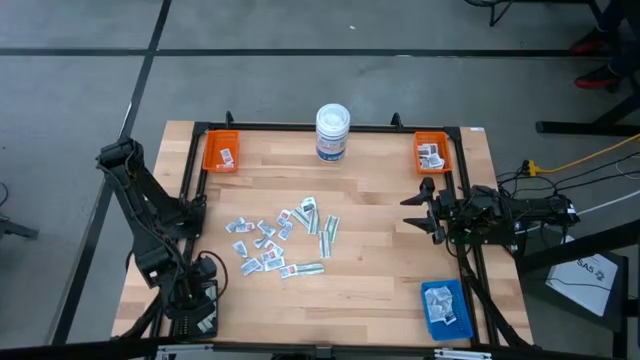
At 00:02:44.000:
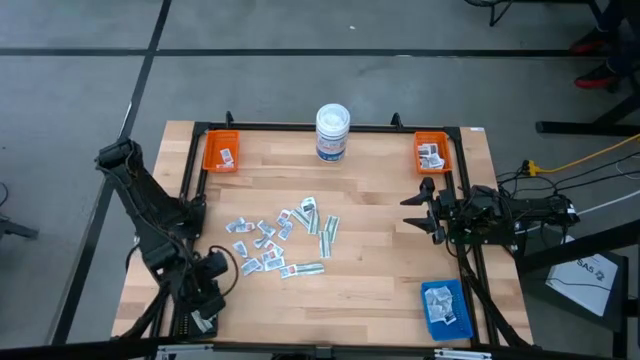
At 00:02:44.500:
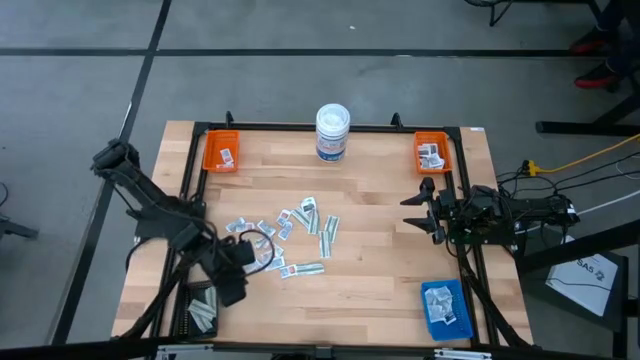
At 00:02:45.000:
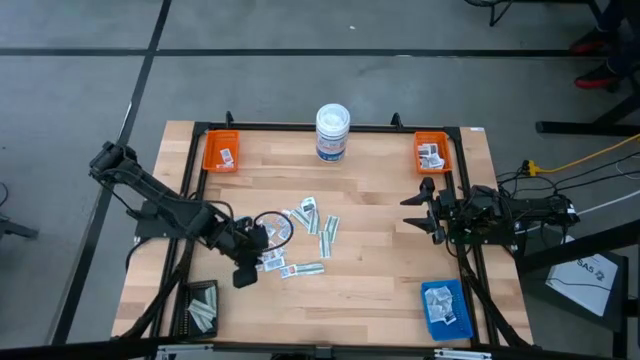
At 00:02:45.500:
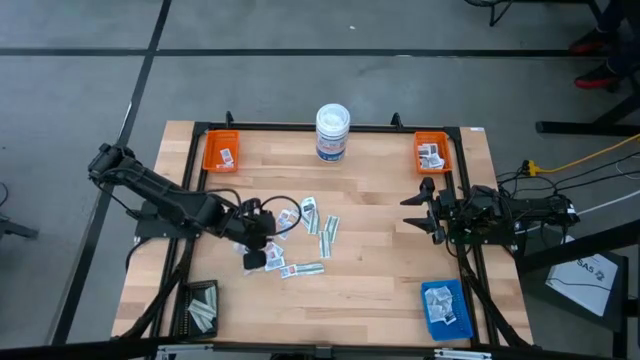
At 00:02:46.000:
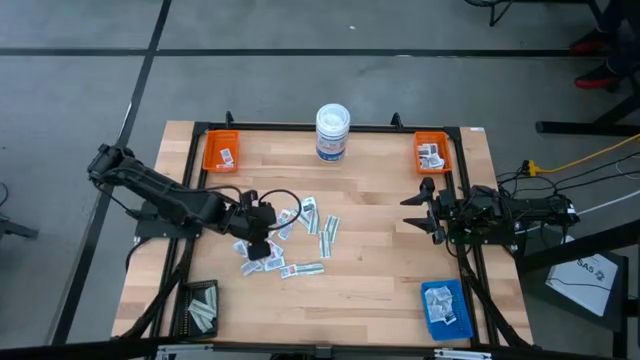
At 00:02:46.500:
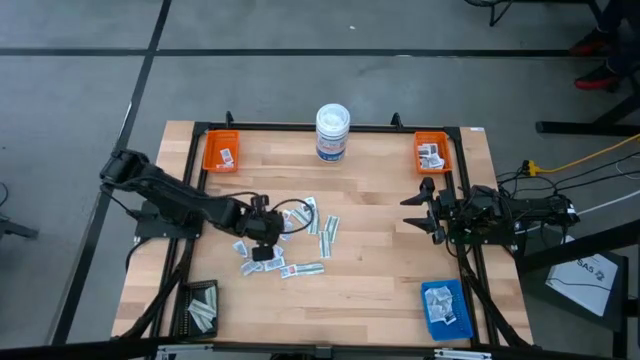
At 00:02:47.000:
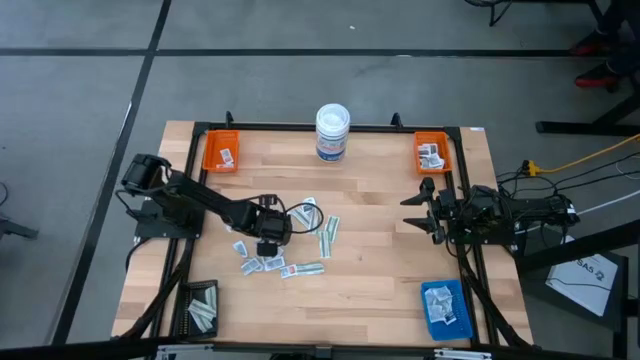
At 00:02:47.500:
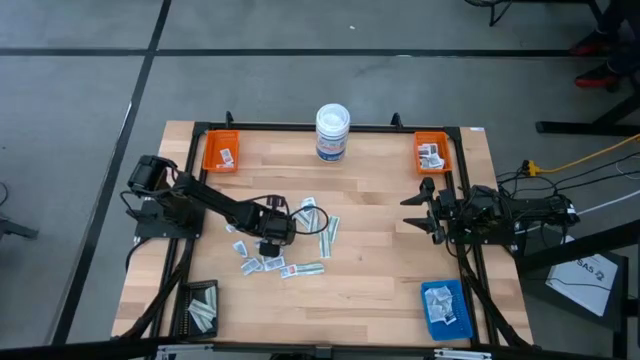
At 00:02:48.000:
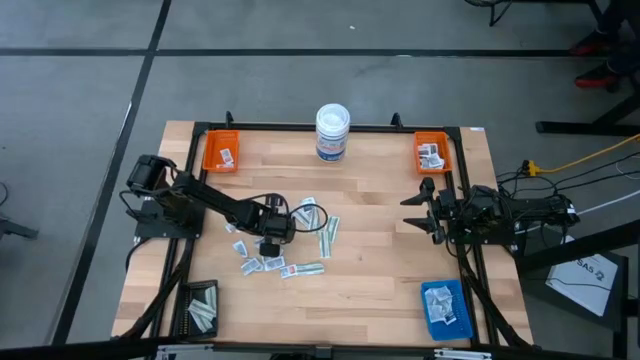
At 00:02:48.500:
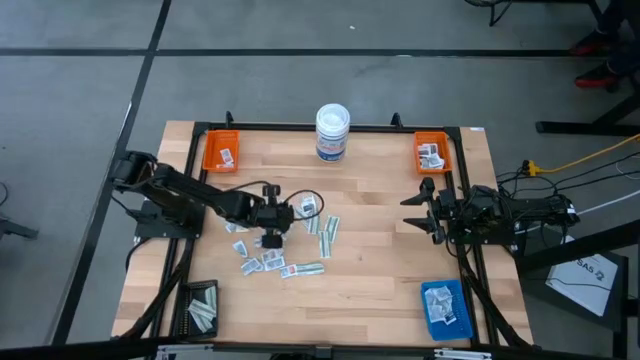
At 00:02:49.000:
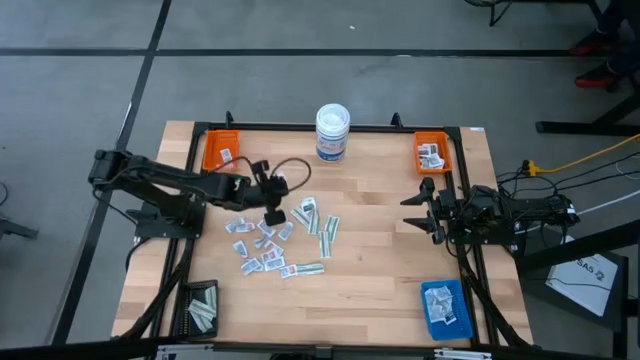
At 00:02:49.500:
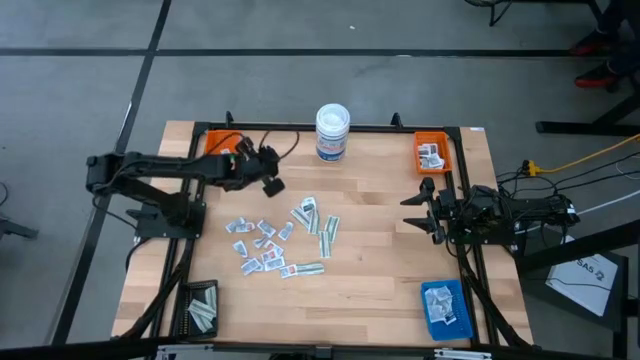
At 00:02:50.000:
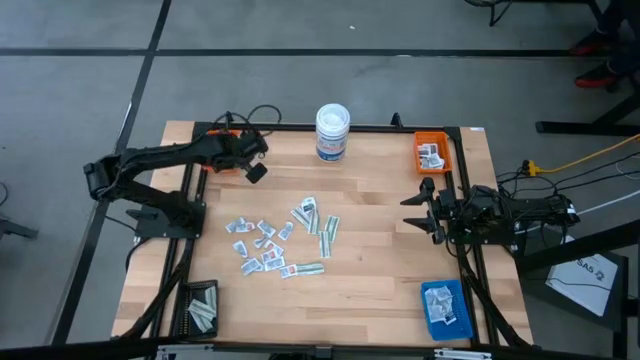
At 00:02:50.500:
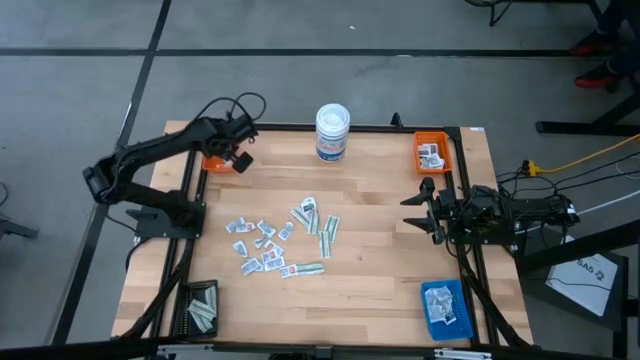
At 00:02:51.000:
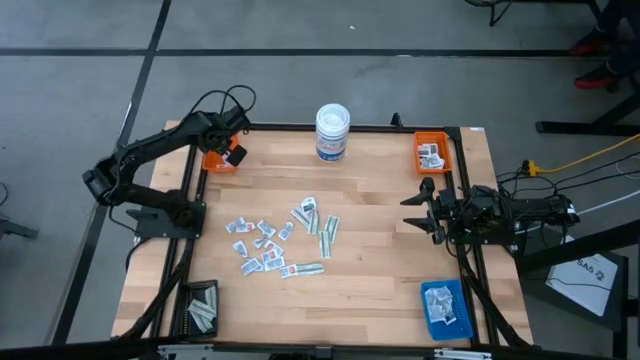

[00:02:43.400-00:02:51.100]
Task: Pick & Place First Aid Supplies
Put the orange ointment pack into the left orange bin

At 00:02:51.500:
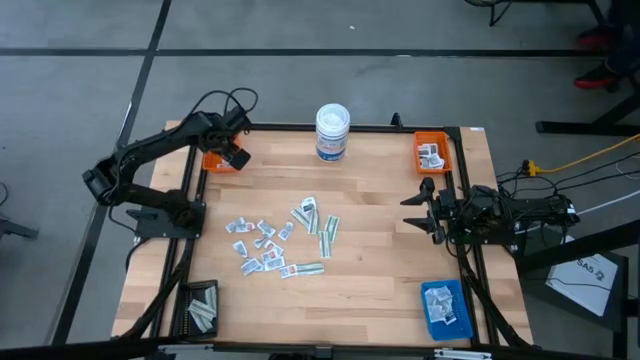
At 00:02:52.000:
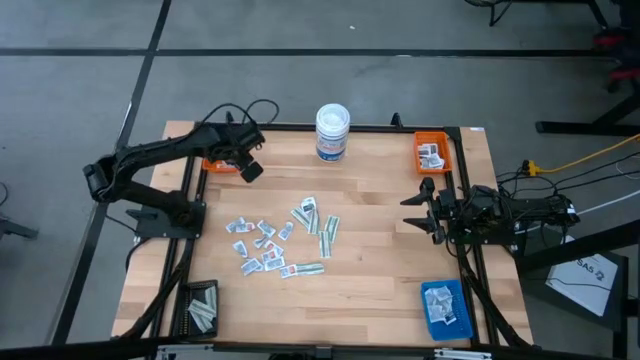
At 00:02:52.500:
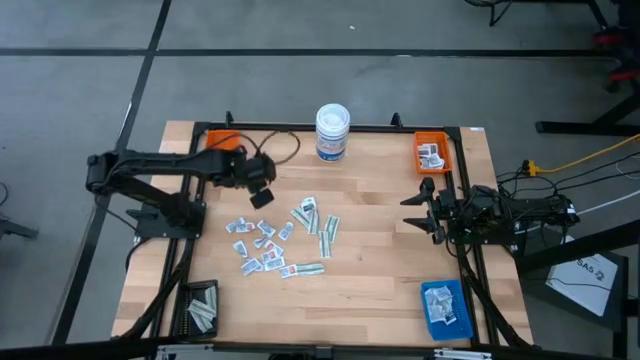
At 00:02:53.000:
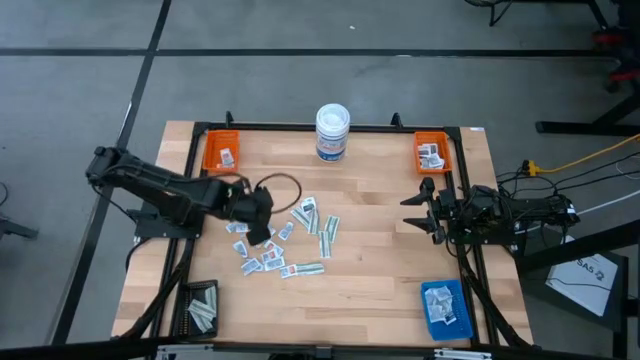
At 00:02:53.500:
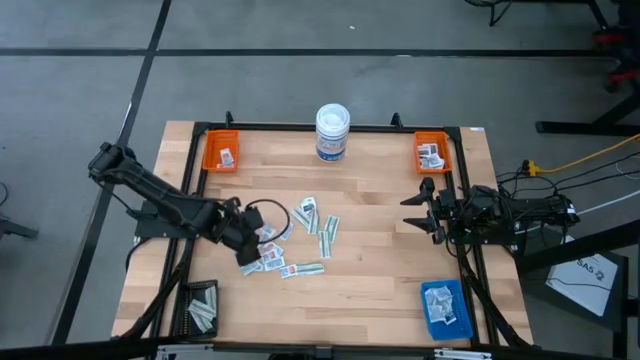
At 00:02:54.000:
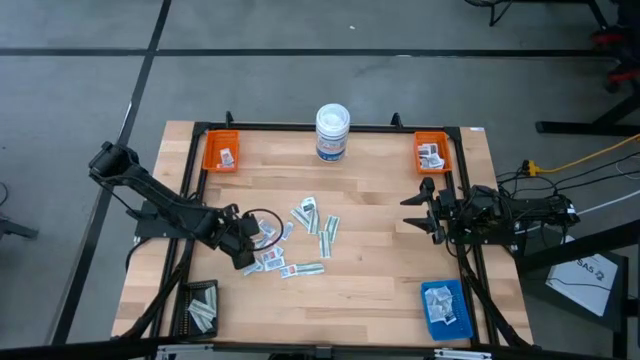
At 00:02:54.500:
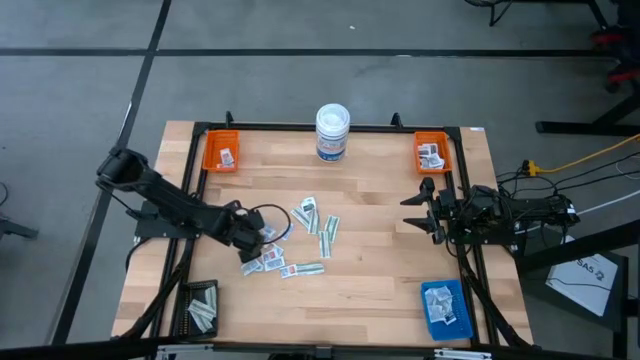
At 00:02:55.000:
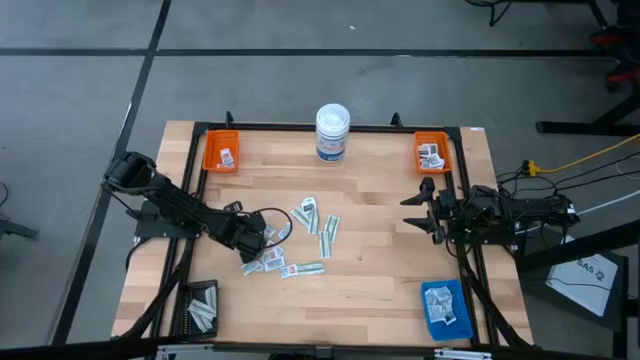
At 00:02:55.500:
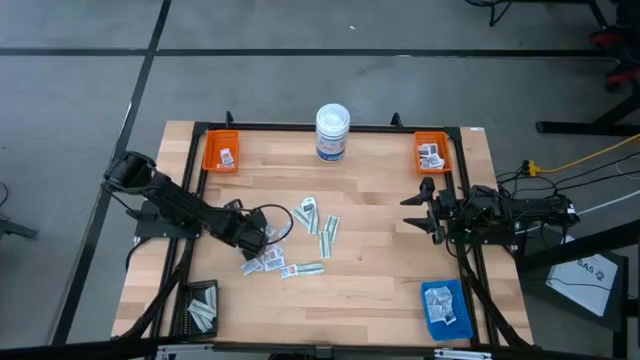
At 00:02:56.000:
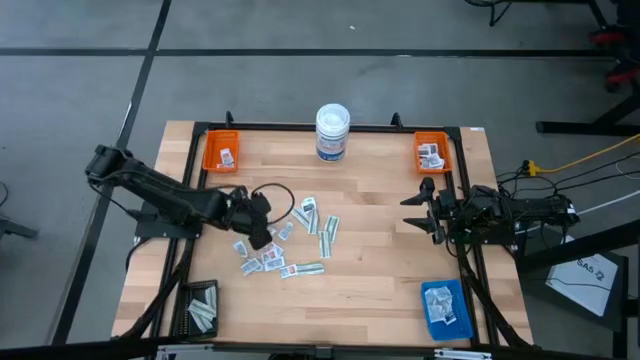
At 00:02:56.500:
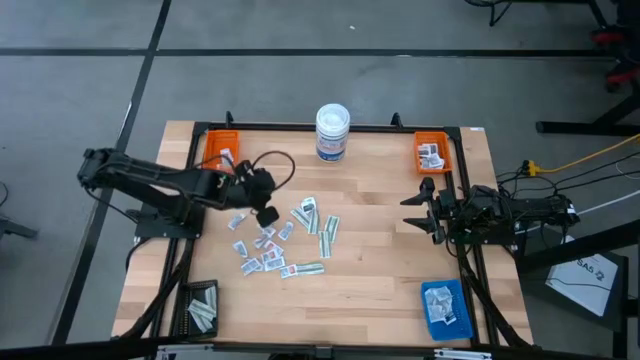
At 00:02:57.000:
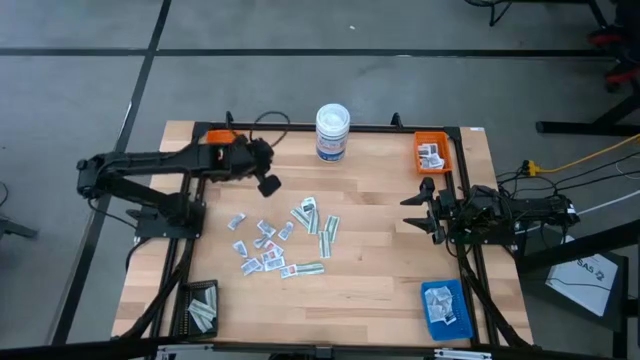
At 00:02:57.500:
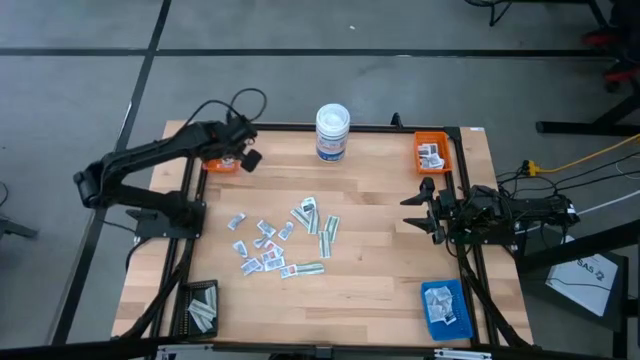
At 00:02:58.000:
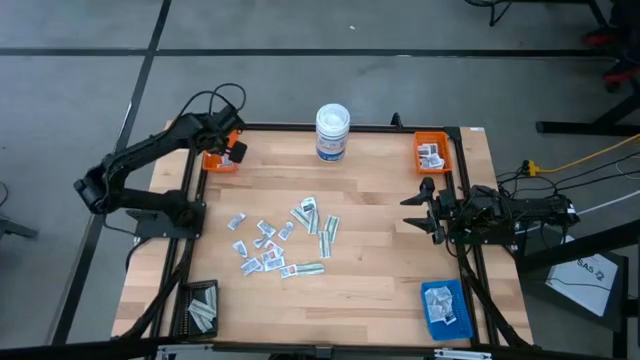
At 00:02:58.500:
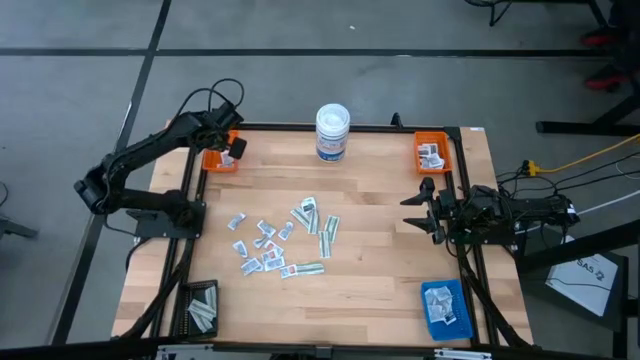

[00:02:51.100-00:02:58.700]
Put the orange ointment pack into the left orange bin

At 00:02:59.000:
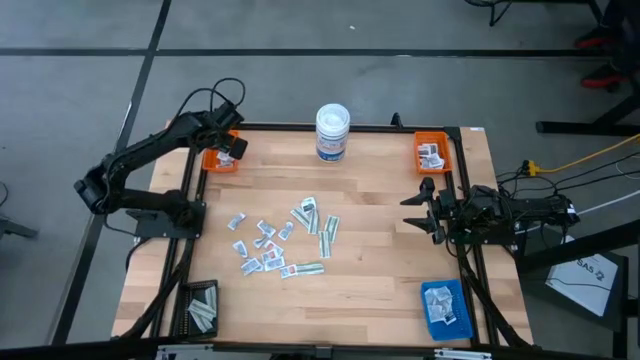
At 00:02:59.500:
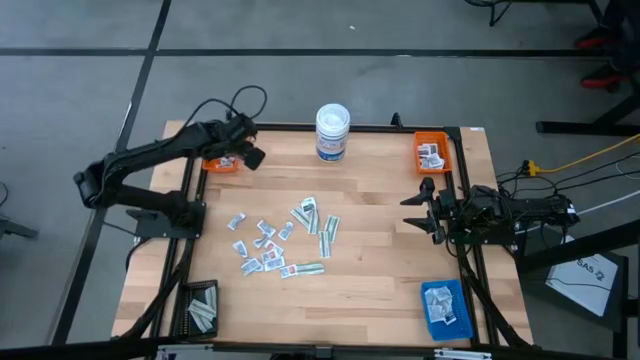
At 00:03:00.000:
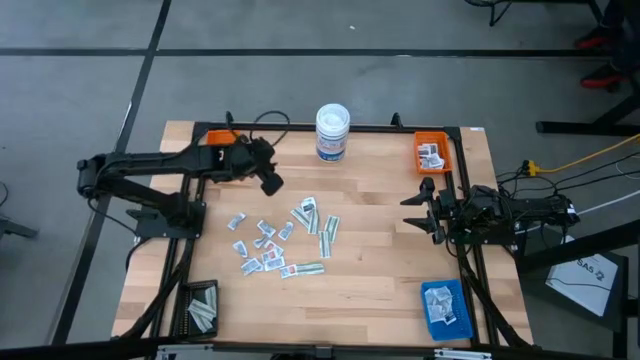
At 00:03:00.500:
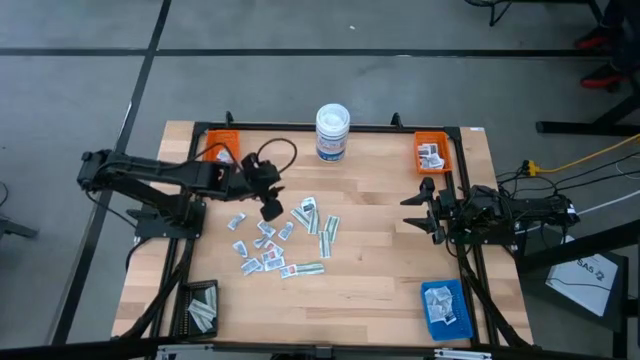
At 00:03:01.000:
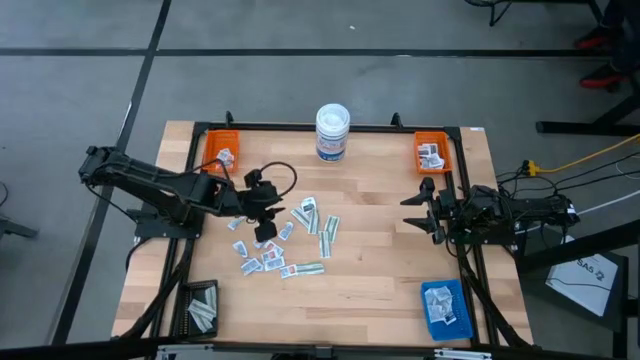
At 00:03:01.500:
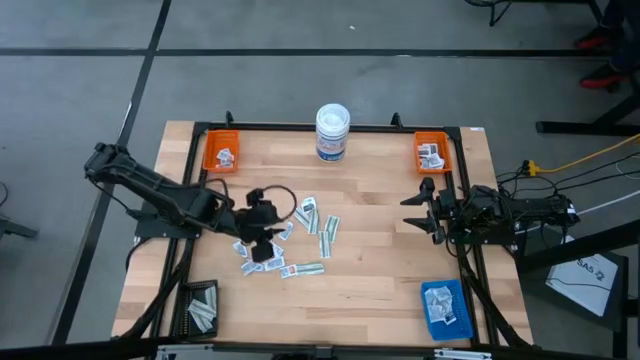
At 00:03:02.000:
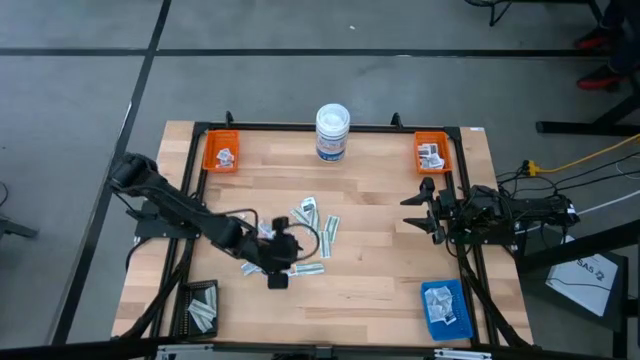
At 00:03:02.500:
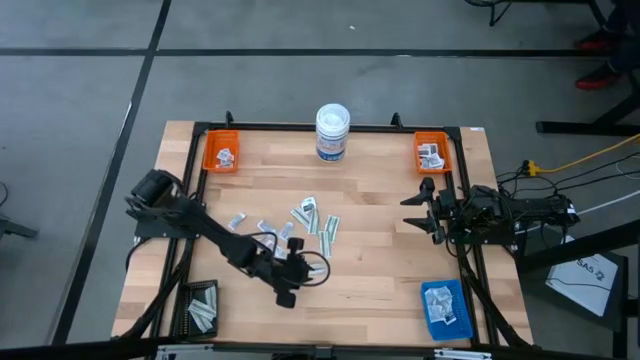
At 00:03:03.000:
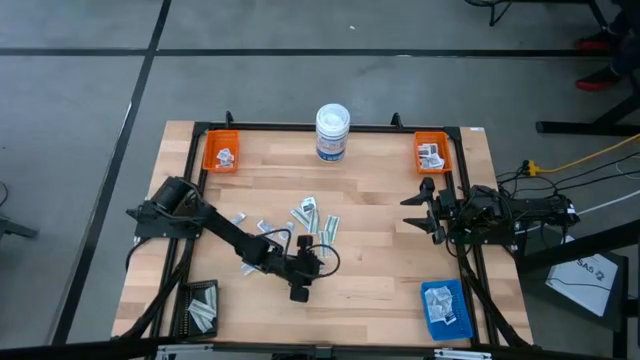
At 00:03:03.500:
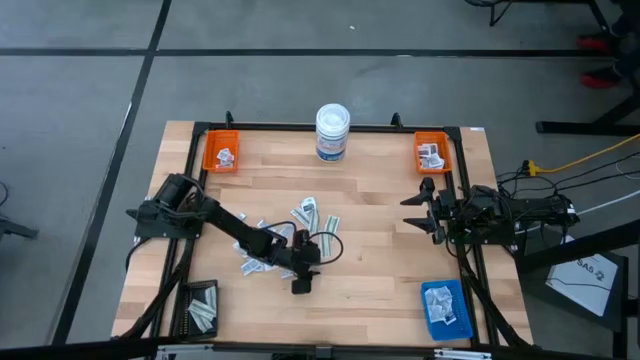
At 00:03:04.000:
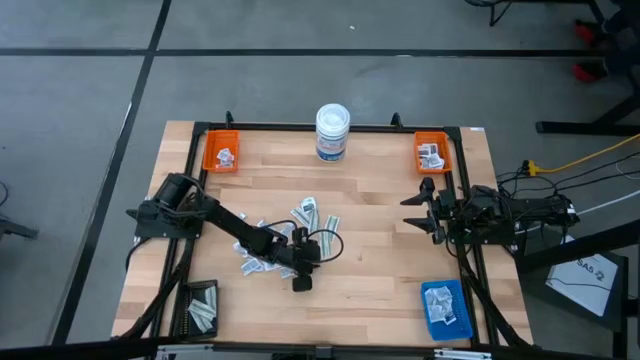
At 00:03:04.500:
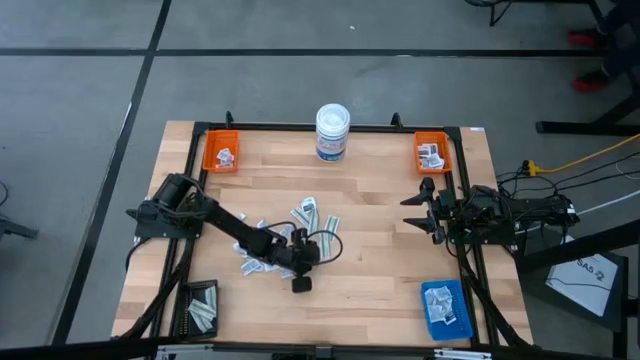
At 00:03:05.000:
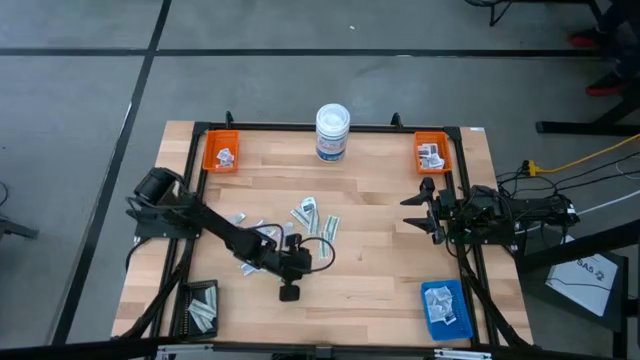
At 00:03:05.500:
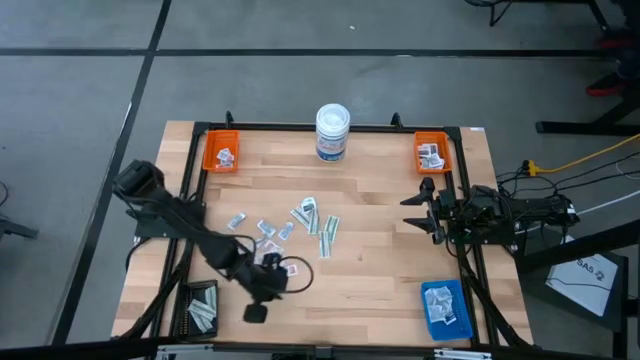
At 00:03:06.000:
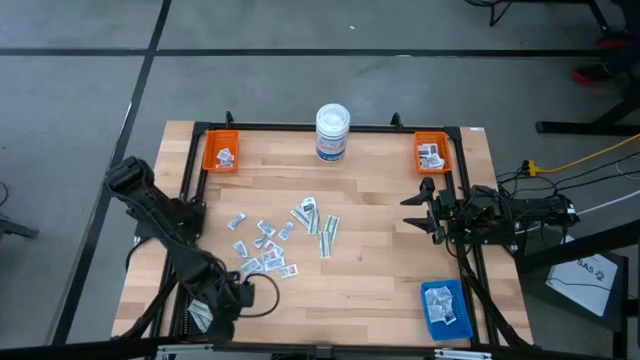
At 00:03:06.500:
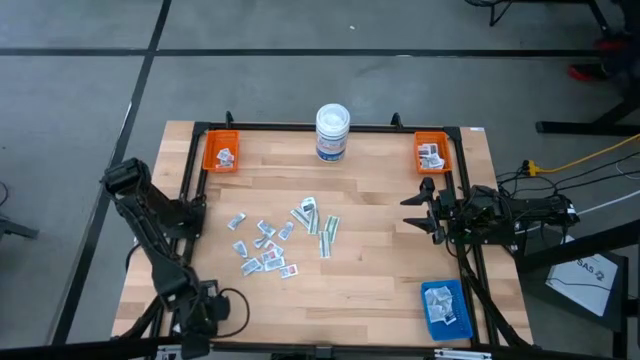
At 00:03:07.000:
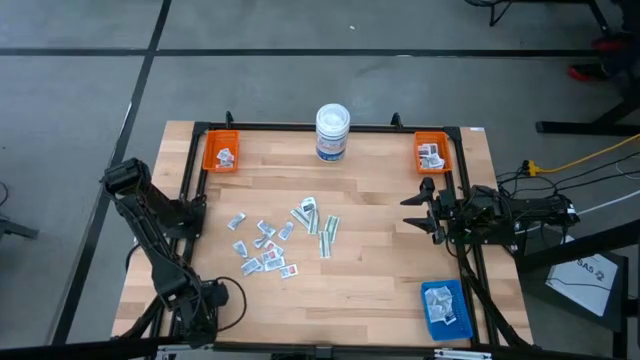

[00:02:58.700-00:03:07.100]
Put the green bandage pack into the black bin
